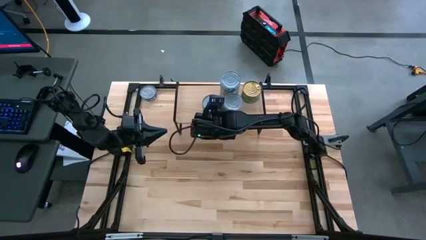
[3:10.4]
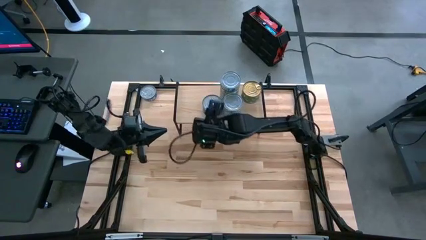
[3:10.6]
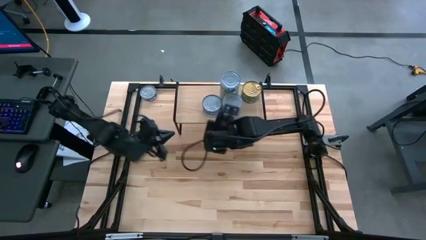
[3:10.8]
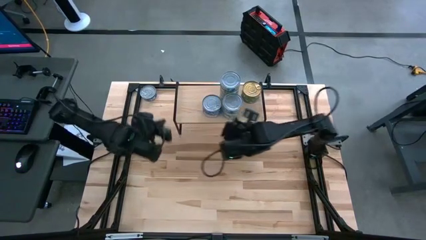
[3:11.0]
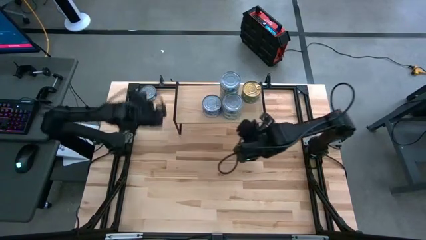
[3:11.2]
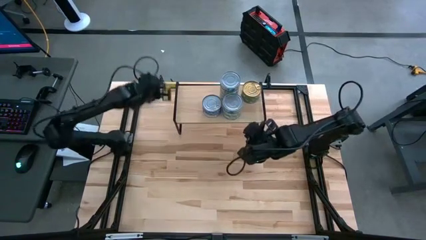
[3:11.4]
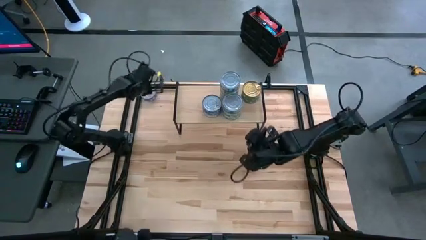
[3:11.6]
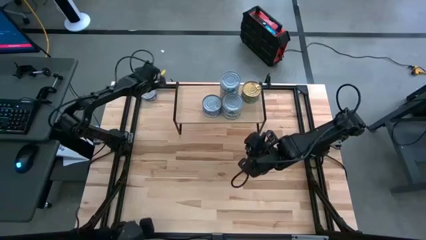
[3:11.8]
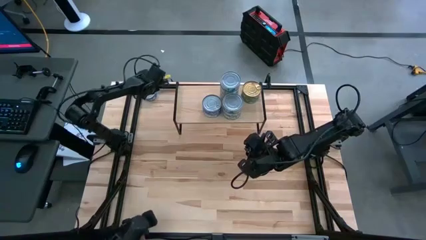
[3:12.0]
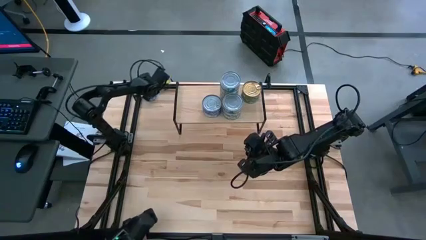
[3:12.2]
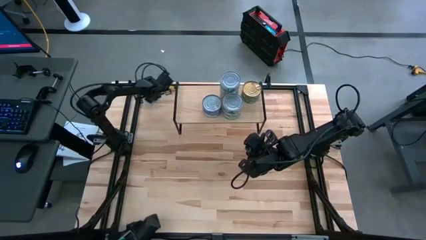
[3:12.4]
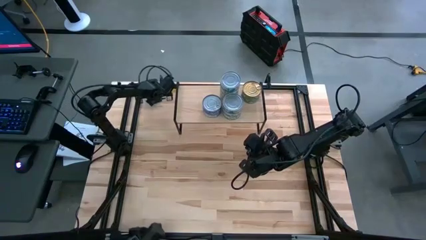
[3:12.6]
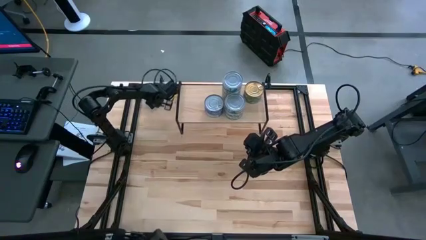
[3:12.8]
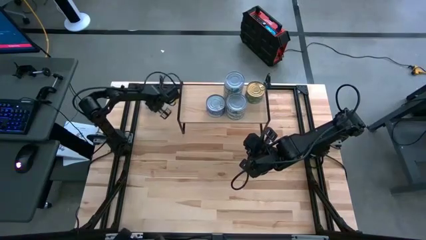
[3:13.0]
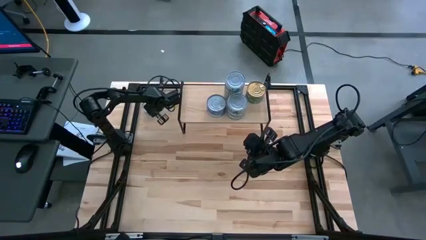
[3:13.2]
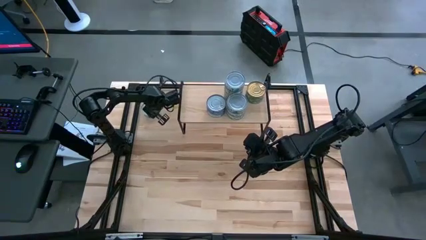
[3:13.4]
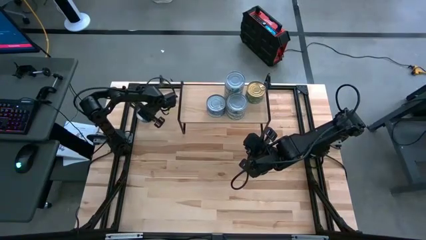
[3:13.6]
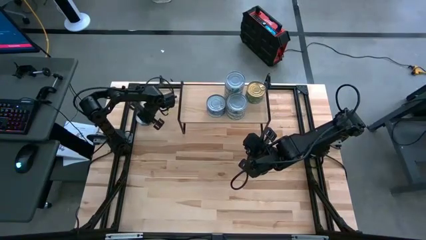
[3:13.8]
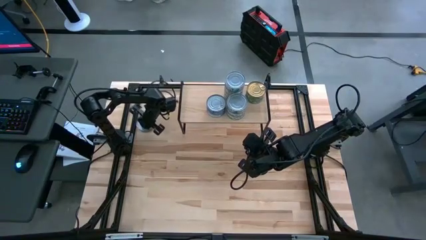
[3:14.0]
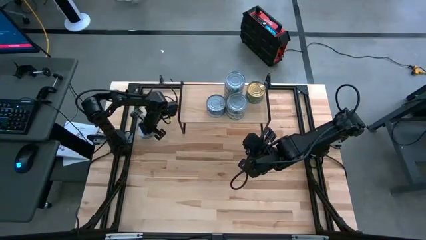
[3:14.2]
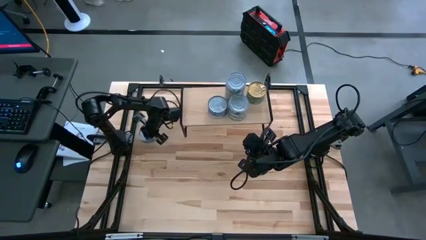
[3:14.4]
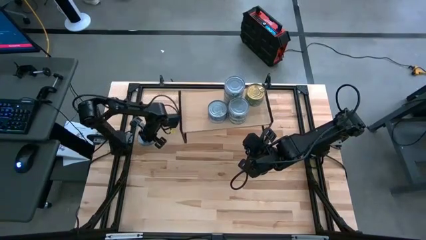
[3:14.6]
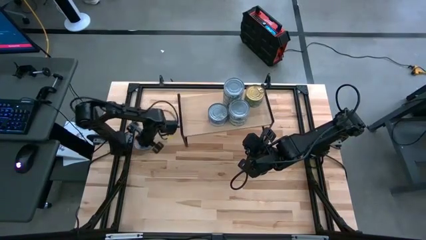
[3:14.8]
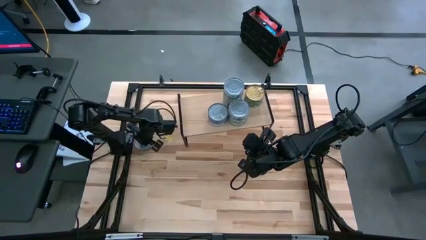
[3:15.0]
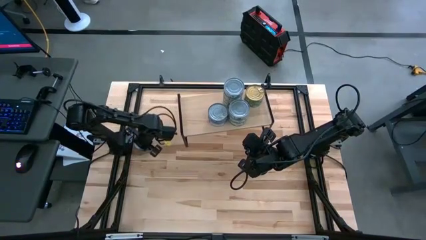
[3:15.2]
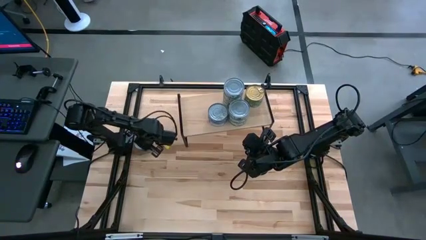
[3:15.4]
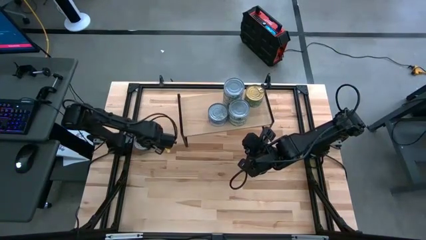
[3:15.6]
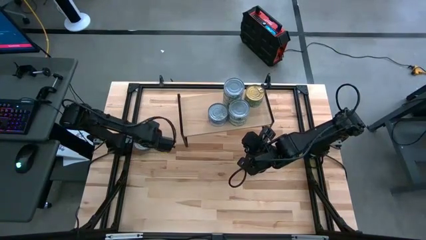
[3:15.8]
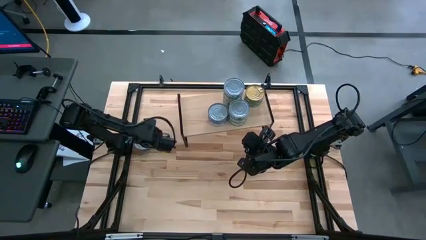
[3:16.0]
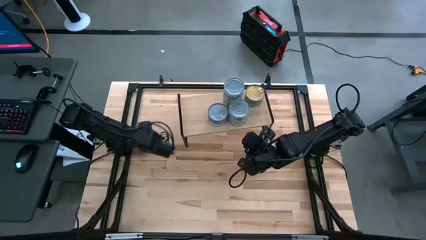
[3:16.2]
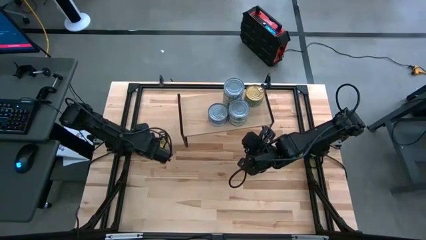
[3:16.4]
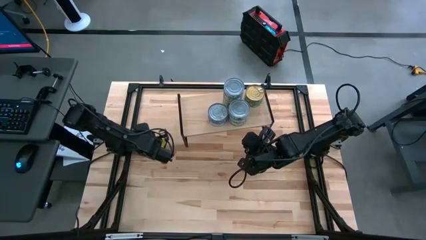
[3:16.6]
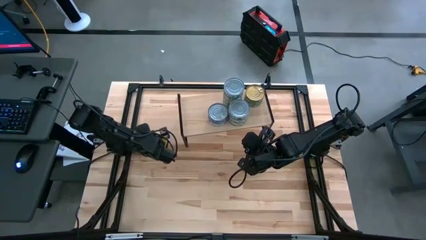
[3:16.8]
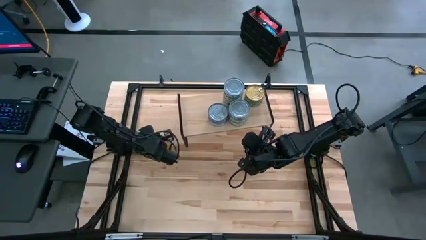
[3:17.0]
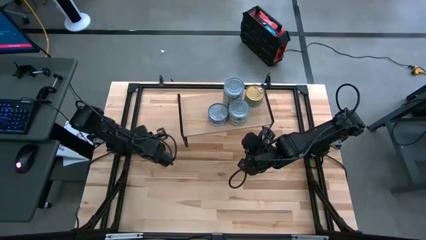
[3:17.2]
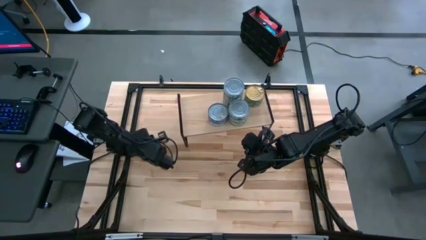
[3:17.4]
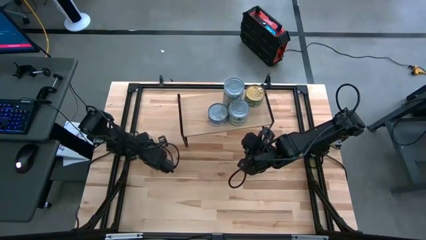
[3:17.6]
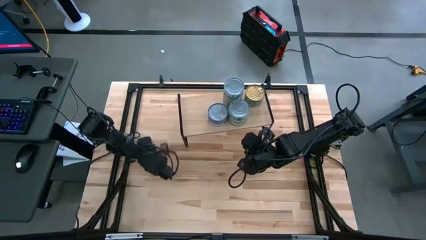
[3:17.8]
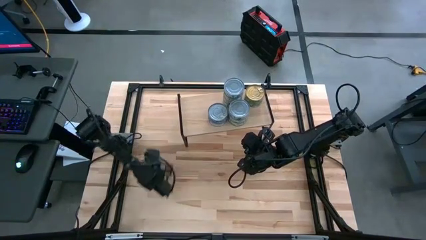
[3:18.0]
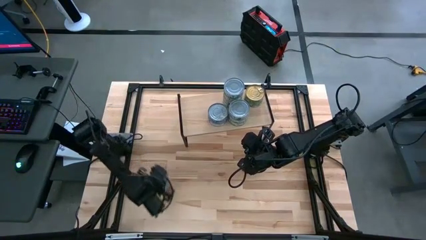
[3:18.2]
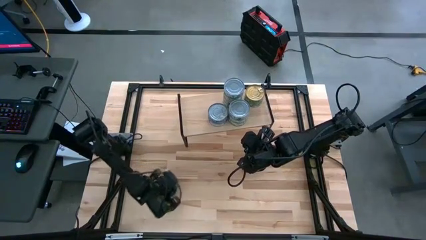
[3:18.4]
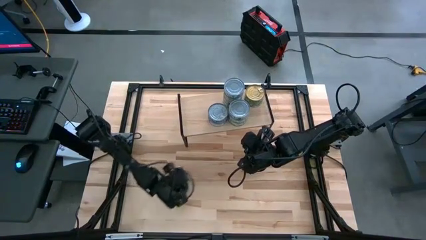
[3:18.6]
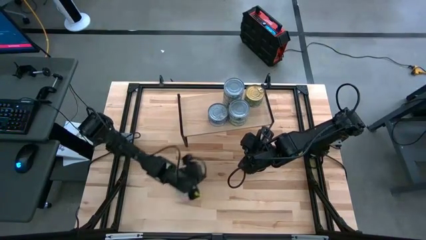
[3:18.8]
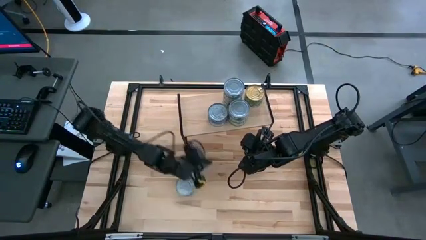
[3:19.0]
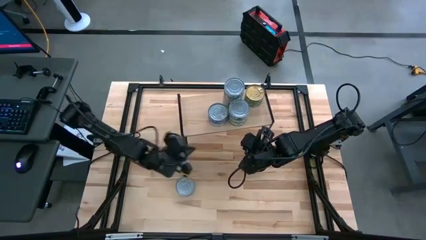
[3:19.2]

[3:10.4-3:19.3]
Task: Stack canned seafood by type on shelf
Move the blue tuna can closer to the center

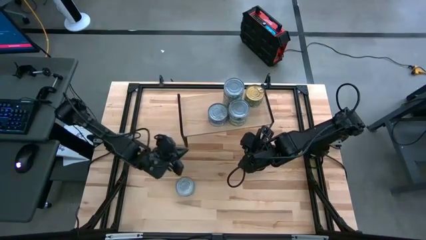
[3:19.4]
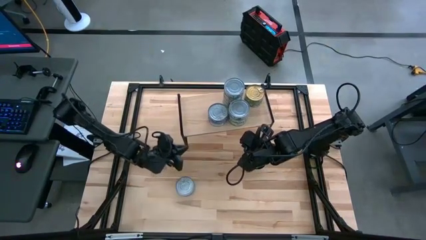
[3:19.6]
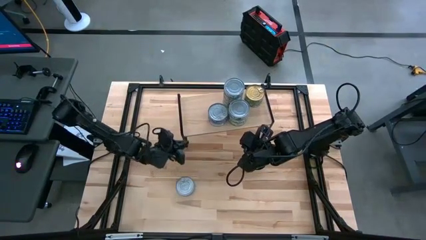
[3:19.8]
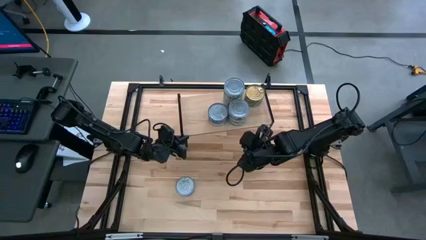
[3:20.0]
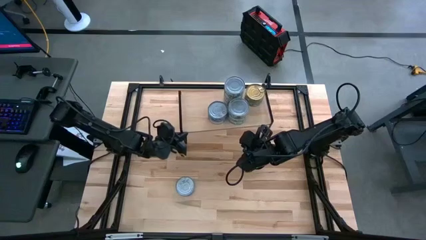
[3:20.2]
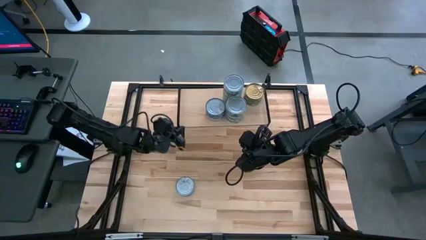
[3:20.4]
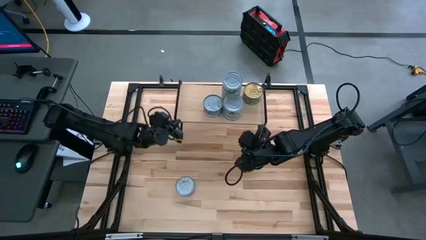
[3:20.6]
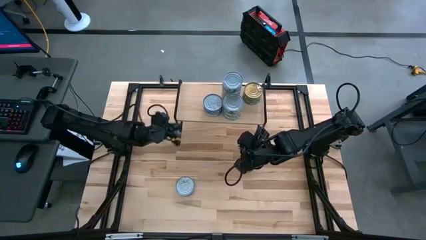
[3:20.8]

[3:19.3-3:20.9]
Adjust the shelf

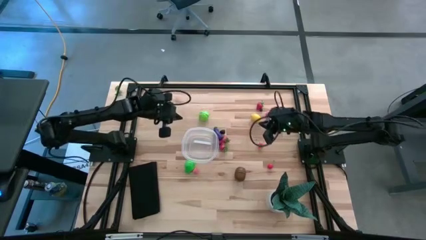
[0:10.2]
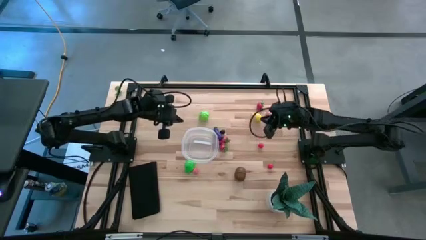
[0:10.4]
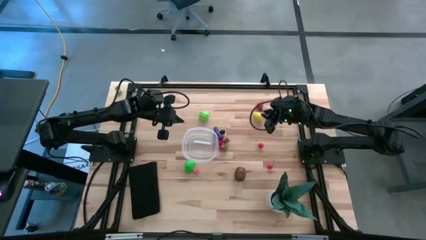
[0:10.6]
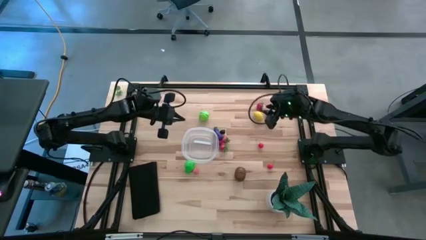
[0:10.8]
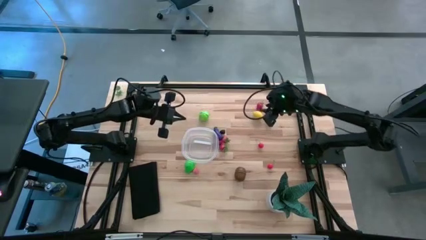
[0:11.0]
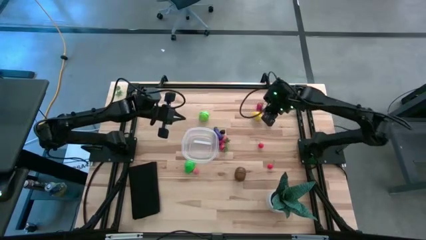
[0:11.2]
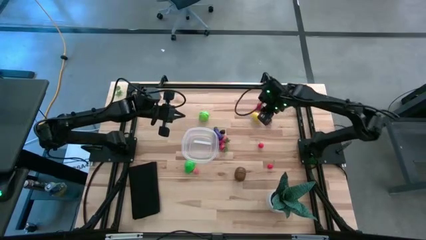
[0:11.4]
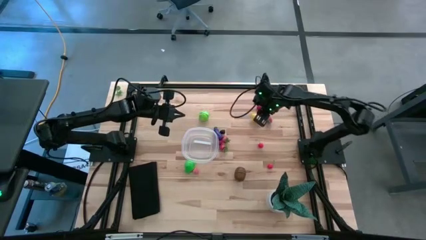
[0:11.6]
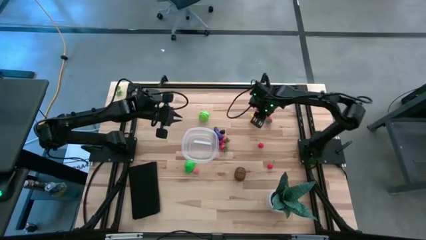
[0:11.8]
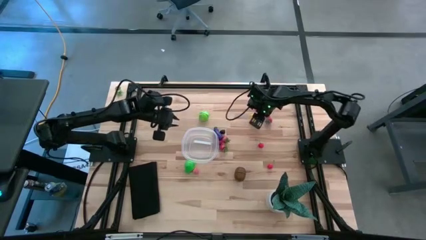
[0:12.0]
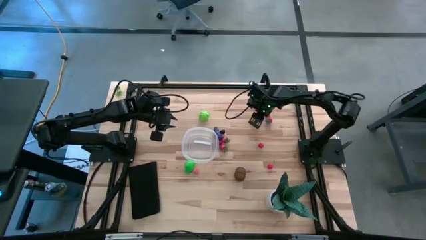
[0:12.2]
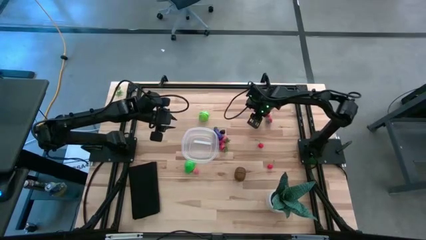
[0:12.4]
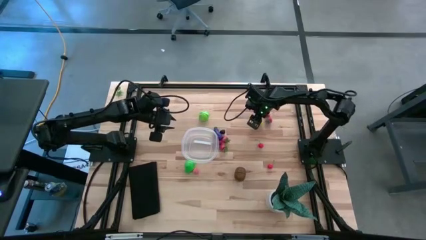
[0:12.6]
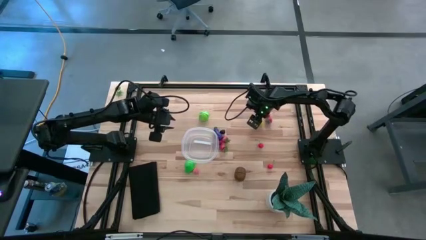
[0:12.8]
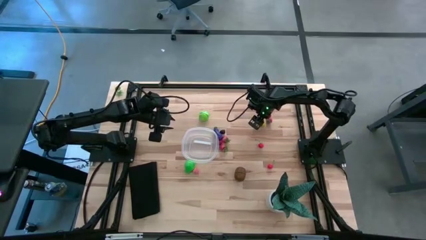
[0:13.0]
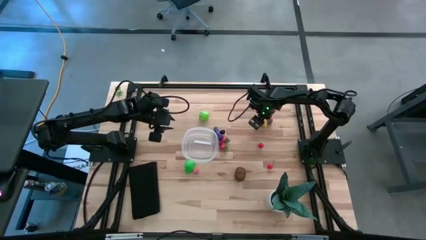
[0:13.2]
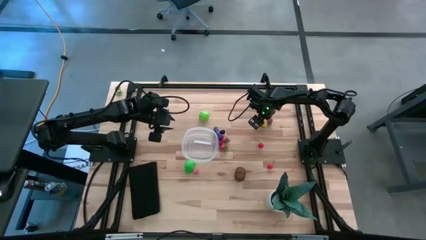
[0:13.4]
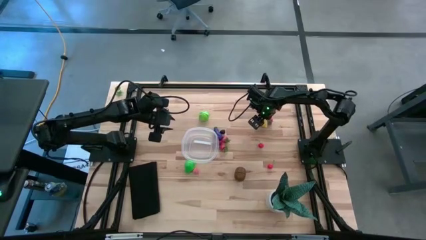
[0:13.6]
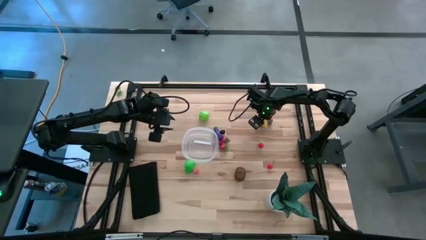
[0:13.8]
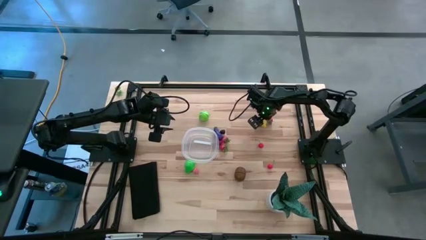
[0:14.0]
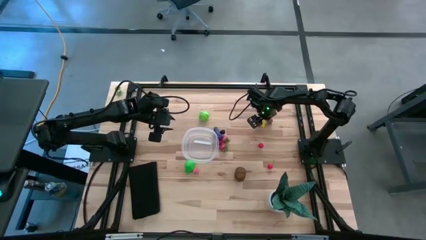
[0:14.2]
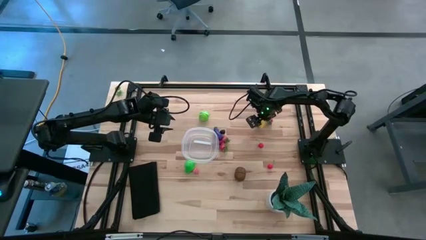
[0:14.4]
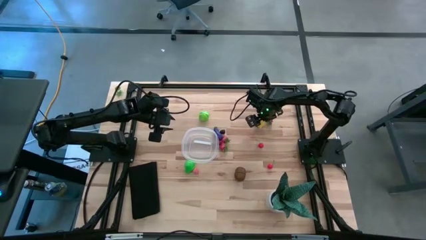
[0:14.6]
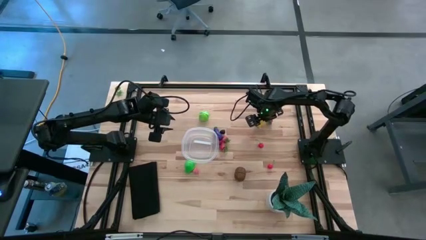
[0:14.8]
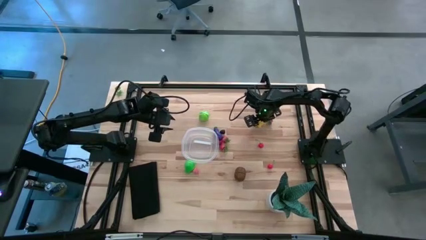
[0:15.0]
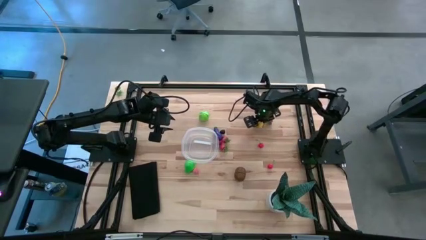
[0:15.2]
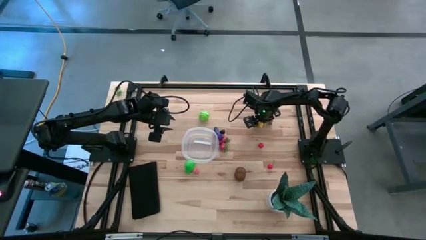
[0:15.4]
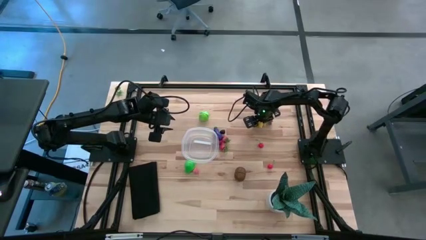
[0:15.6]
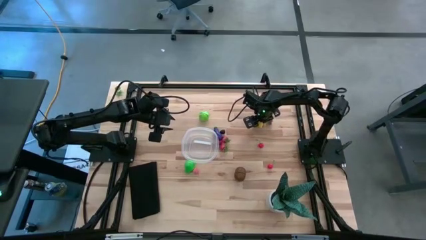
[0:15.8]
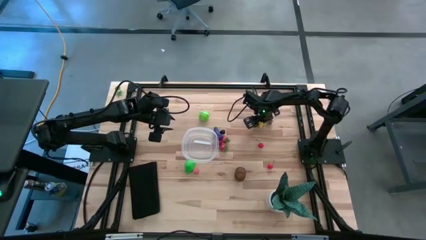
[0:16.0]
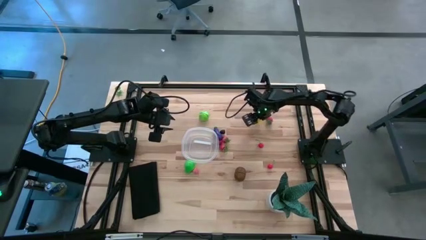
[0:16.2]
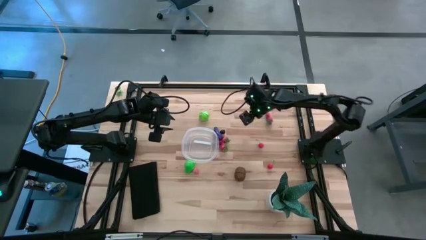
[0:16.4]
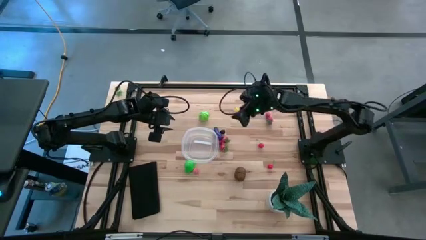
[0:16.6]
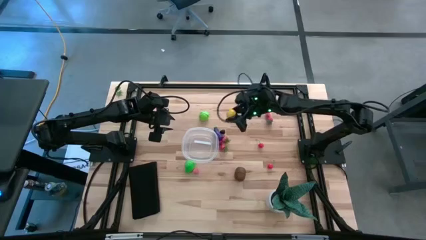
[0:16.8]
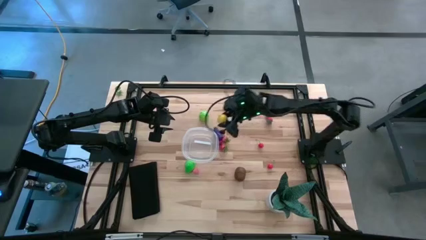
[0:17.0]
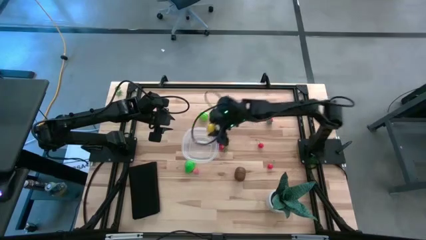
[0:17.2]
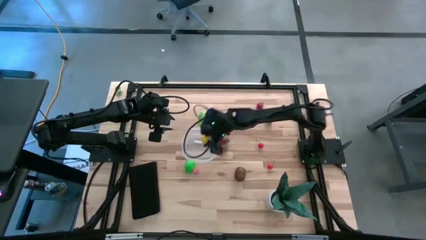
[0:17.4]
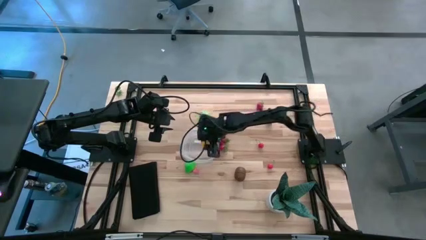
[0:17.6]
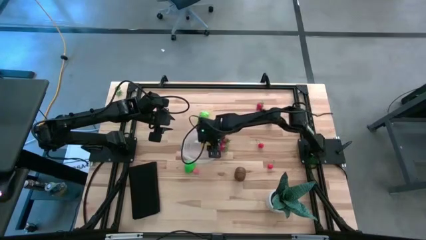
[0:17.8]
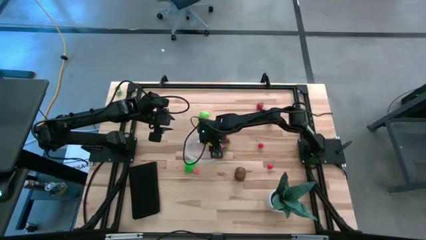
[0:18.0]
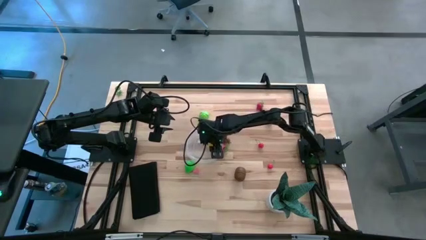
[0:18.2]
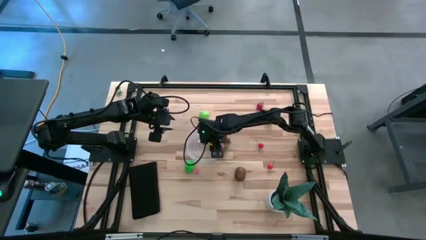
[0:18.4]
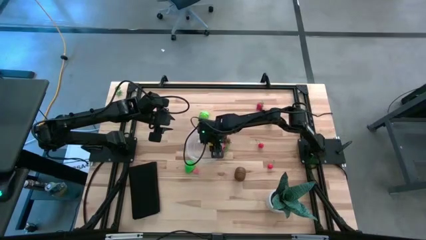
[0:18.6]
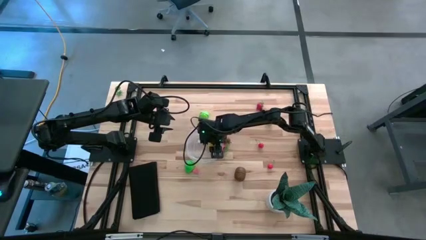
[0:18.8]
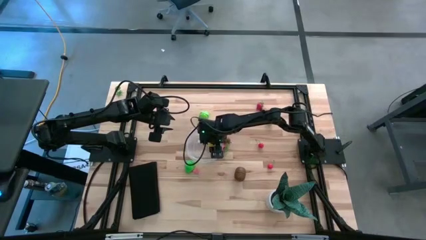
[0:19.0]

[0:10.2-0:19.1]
Task: Pick and placing Produce into tupperware
Put the lemon into the transparent bin
